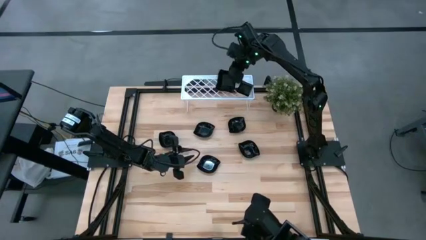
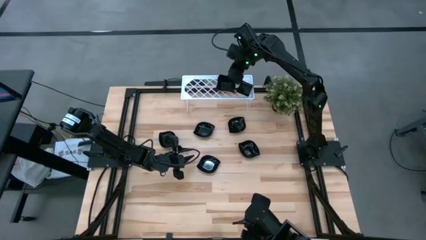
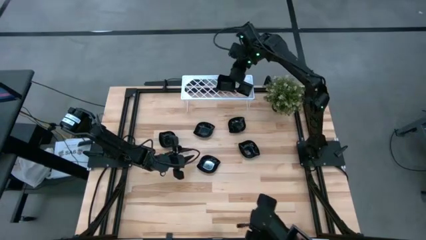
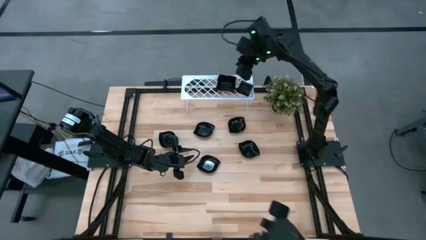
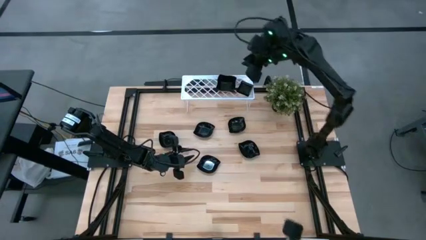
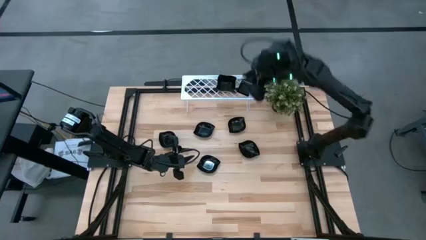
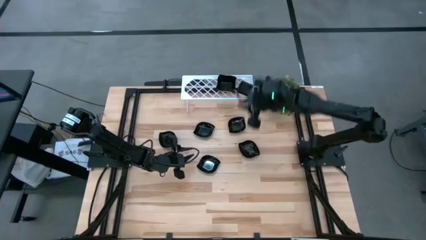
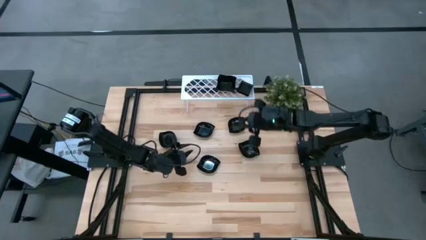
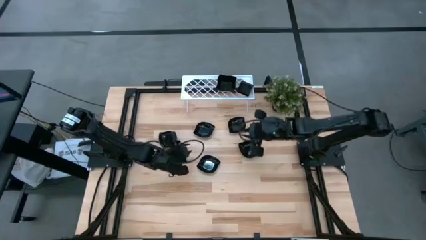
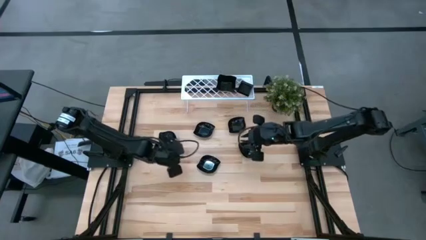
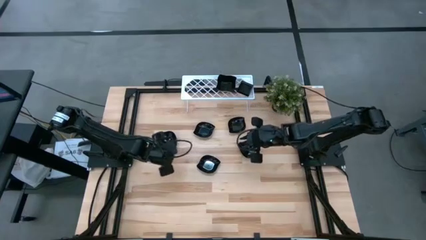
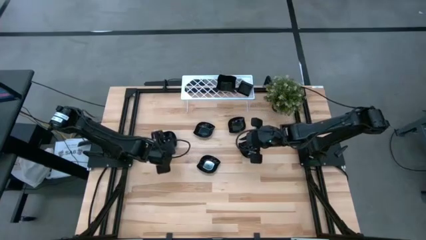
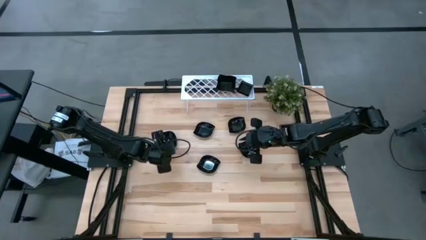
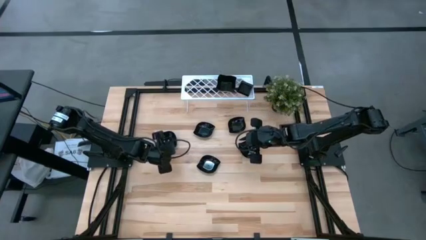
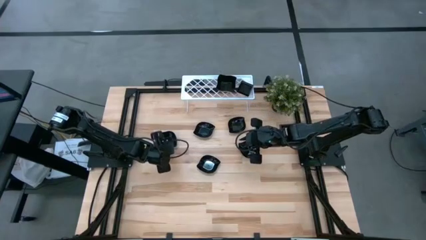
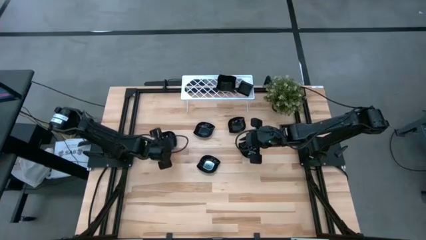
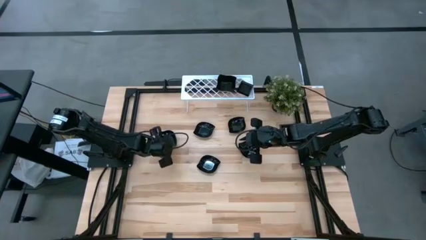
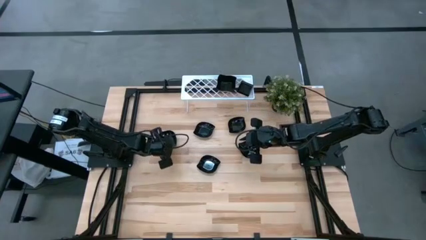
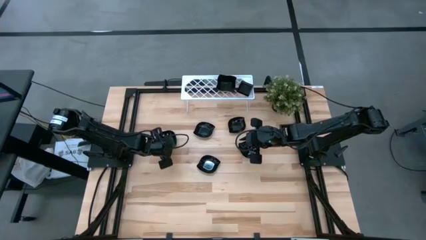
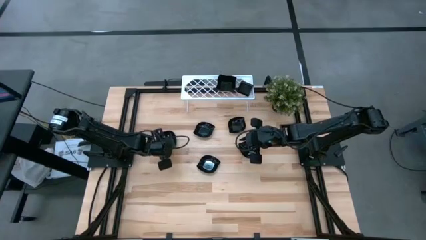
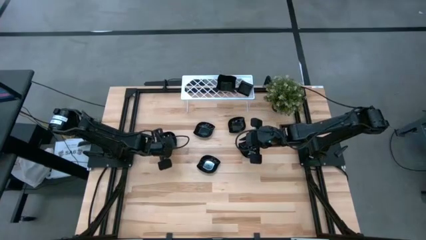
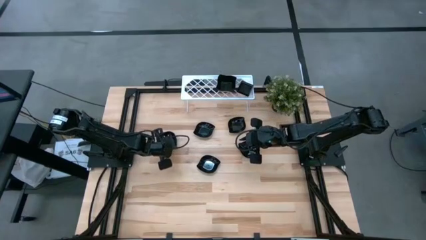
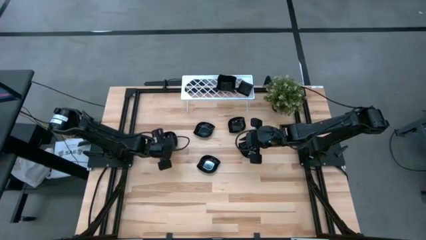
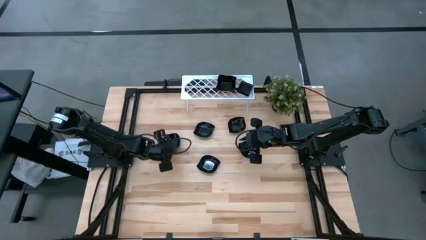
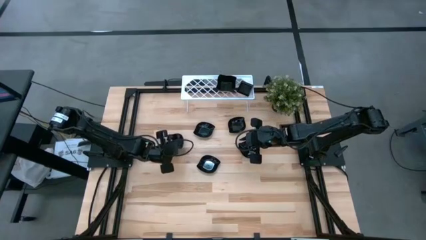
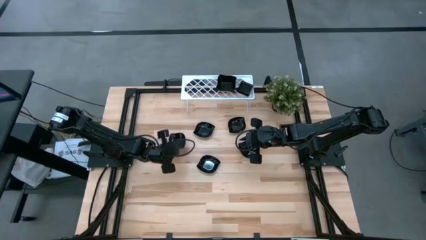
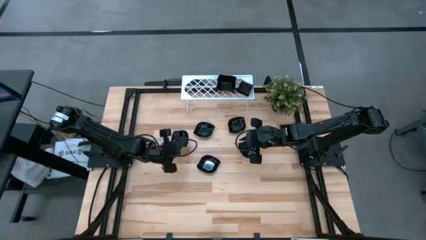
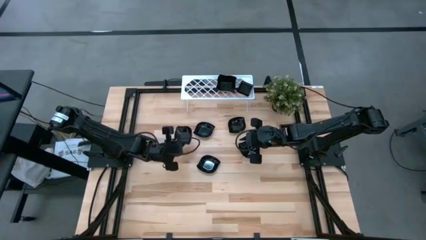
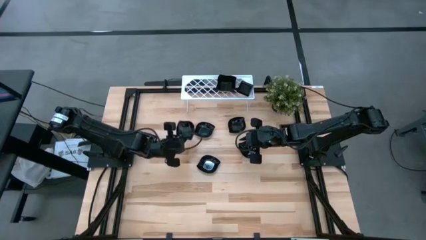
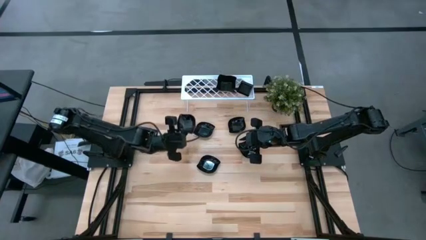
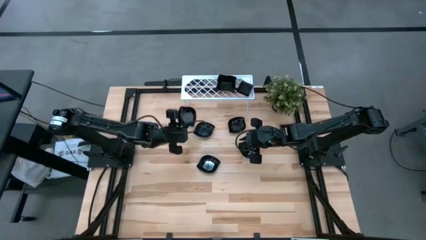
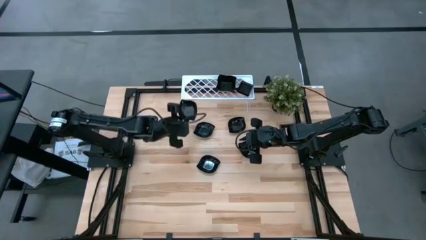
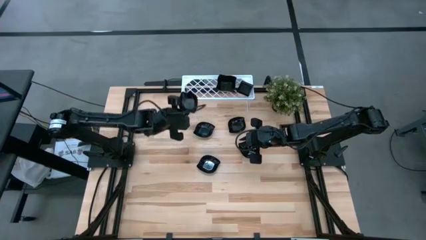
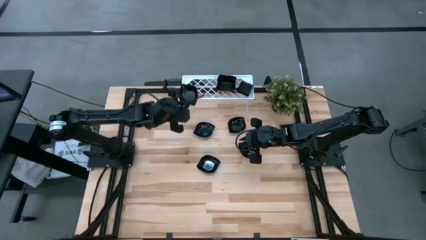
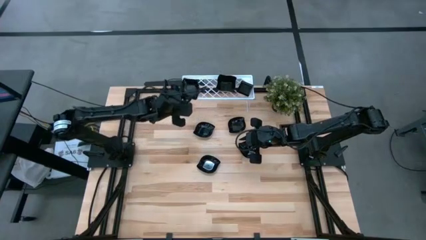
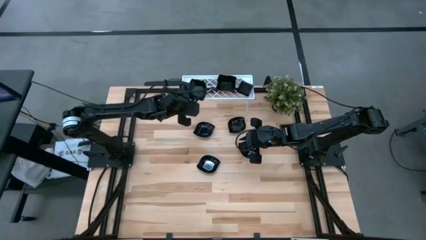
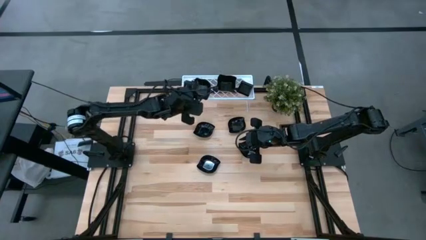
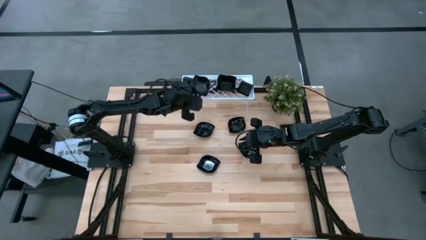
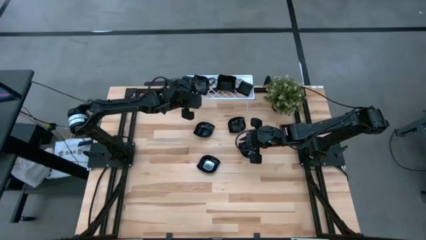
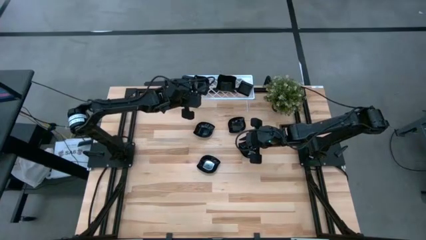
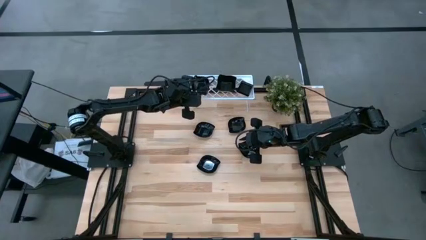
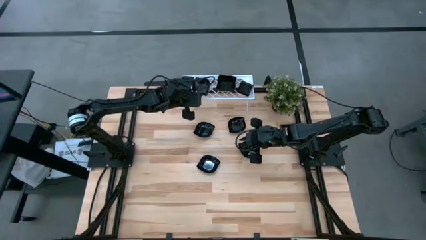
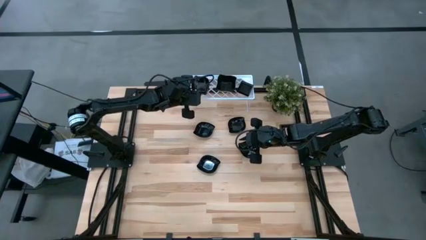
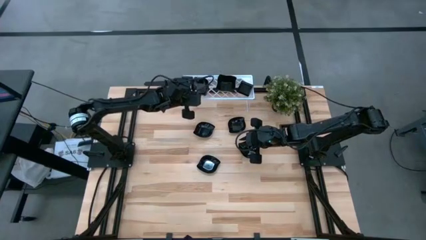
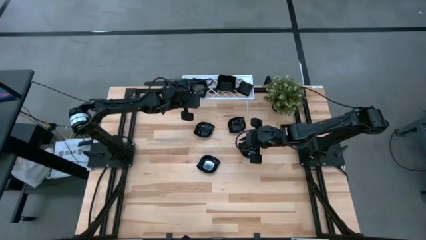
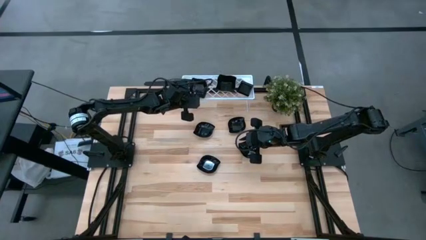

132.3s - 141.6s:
Task: Pick & Place Mini shaped plates
Put the black leaf-shaped plate on the shelf

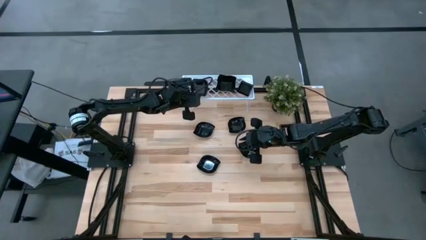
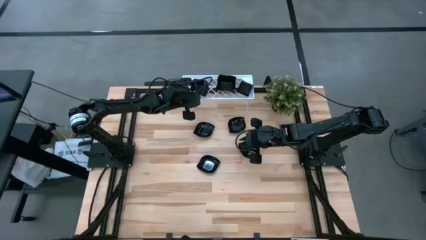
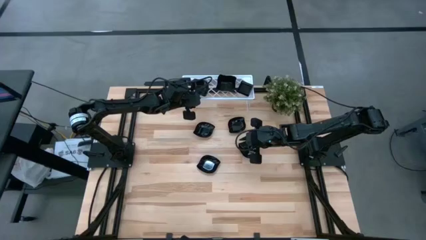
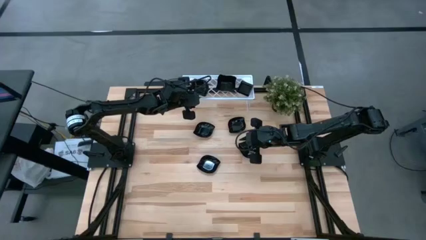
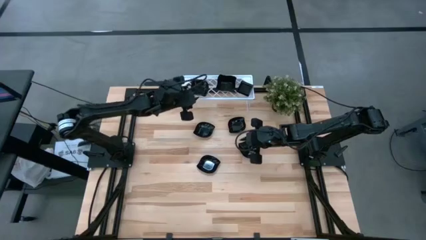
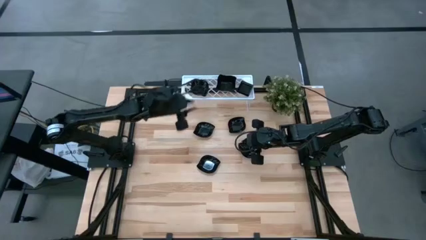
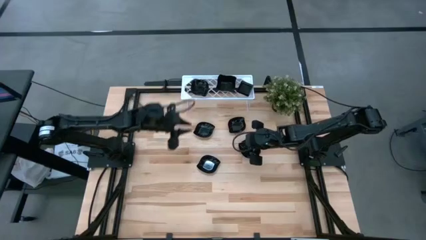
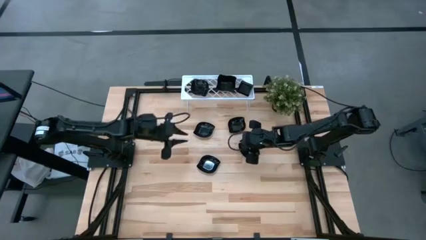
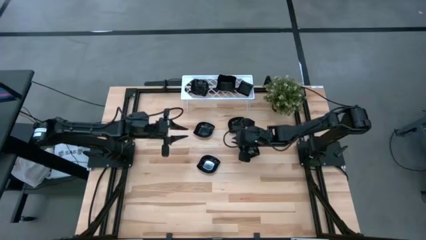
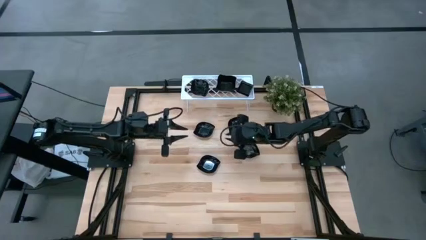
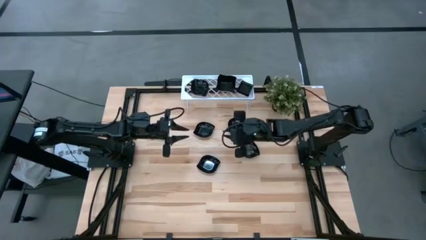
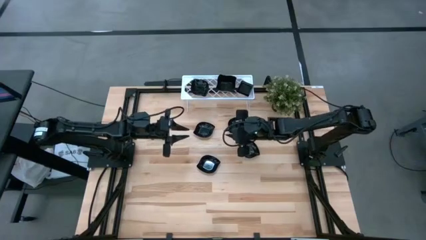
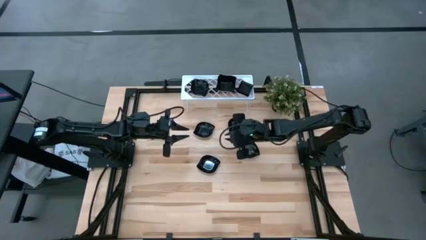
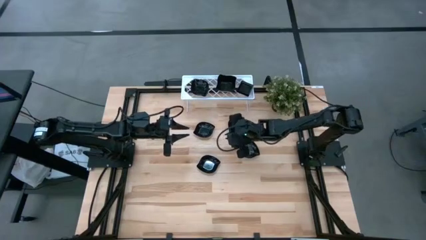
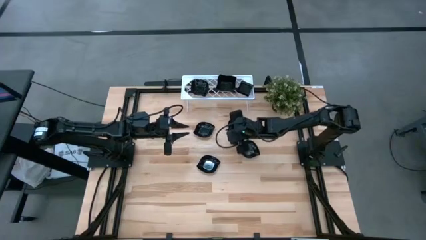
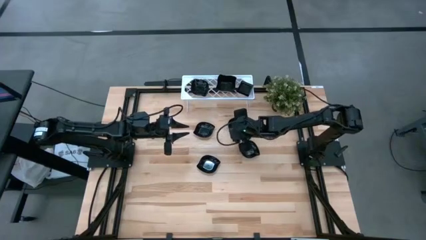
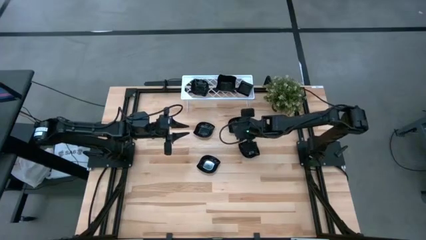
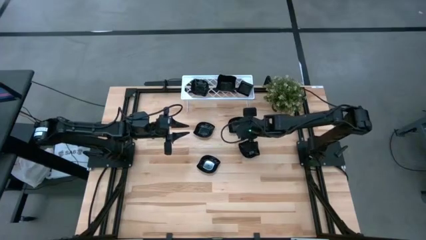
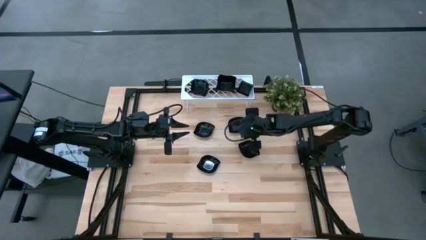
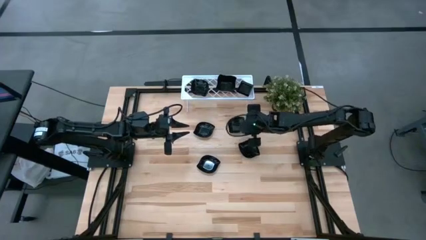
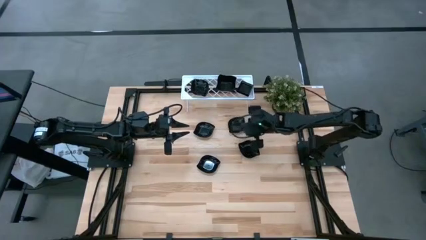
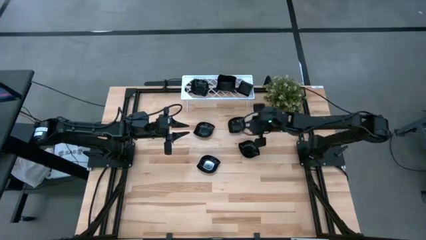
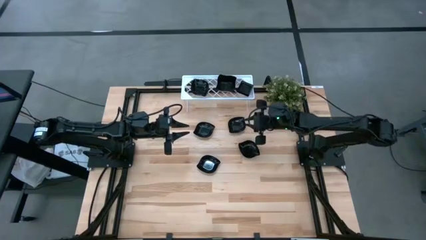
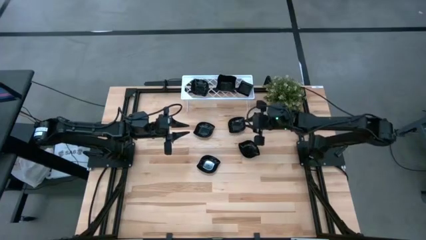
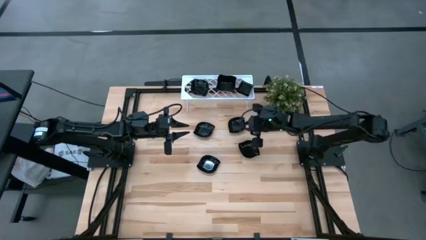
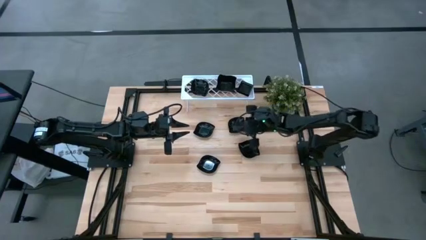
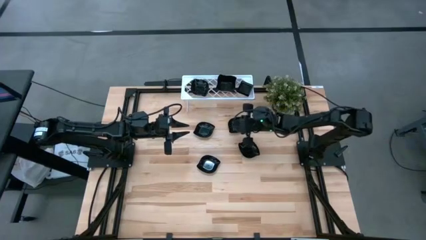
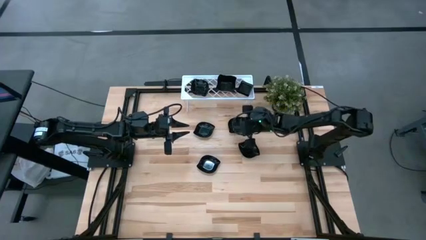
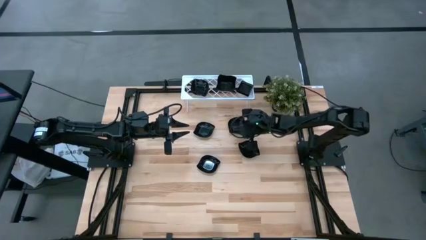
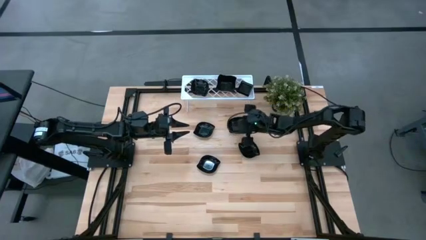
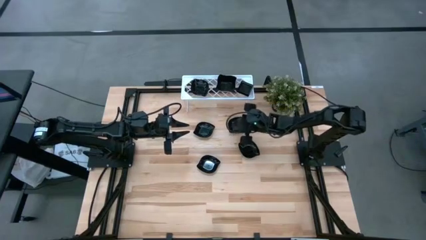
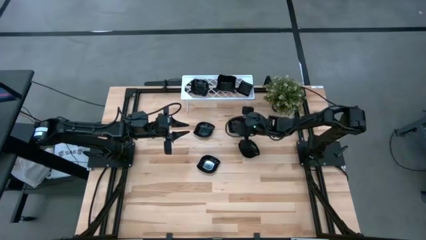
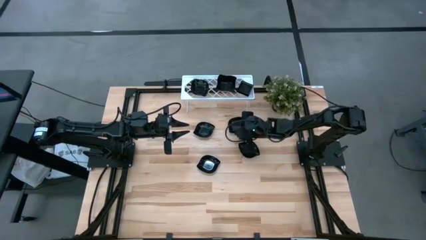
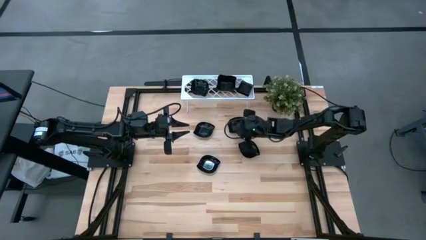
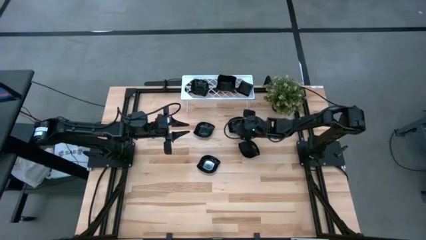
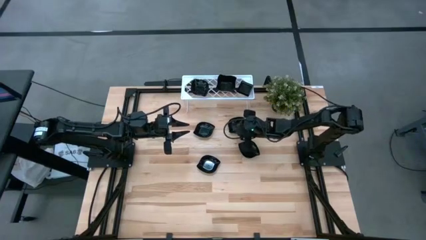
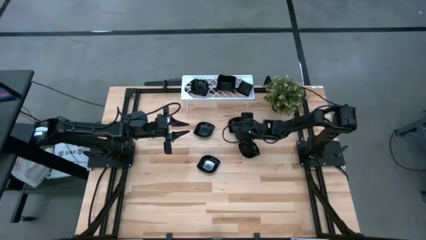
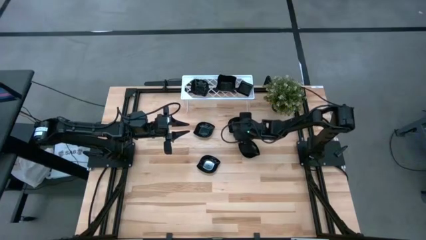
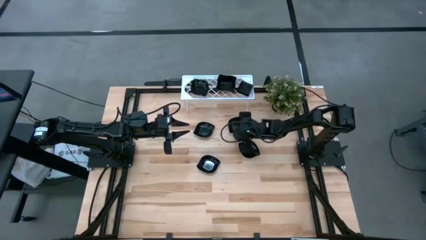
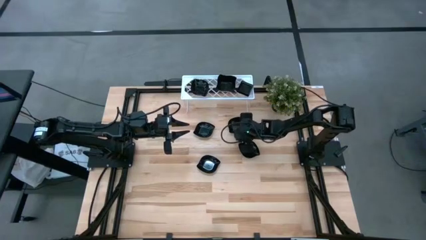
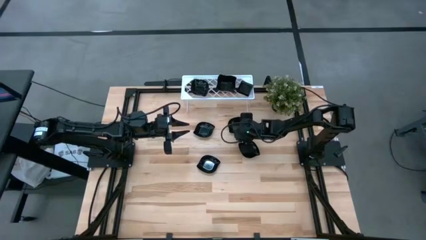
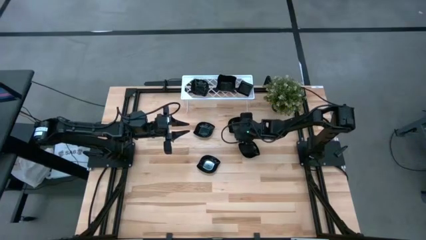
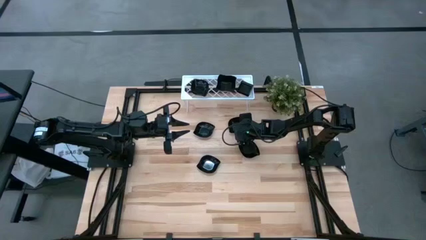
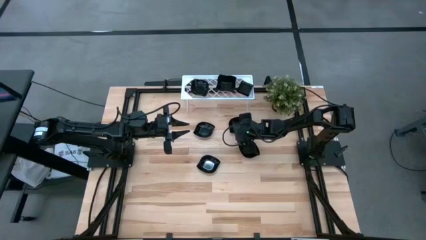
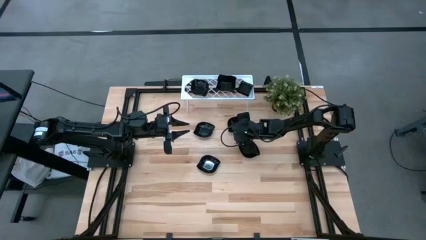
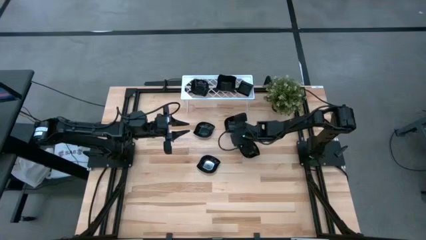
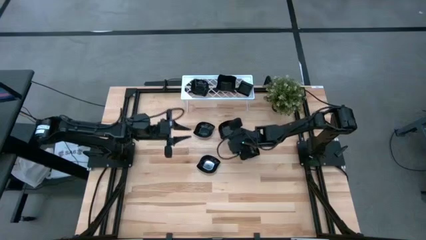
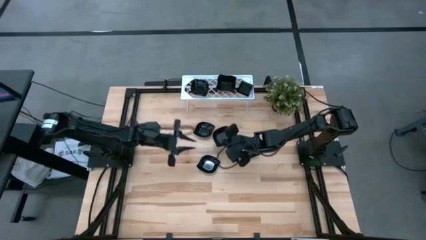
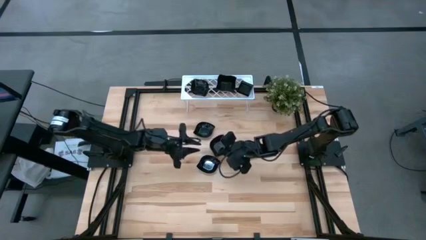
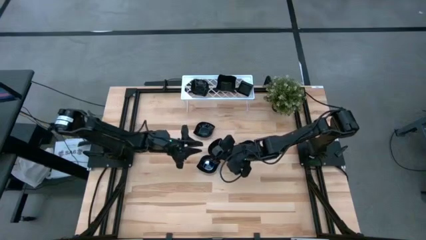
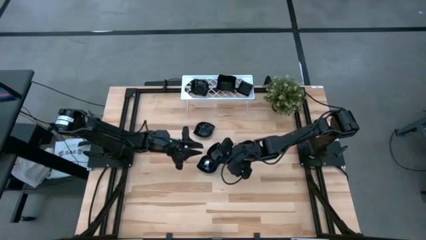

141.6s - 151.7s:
Stack the black leaf-shaped plate on top of the black leaf-shaped plate on the shelf
